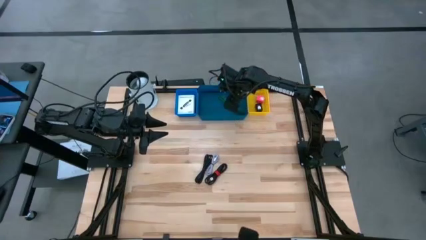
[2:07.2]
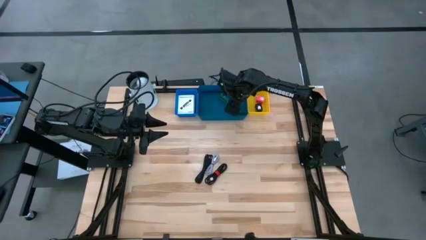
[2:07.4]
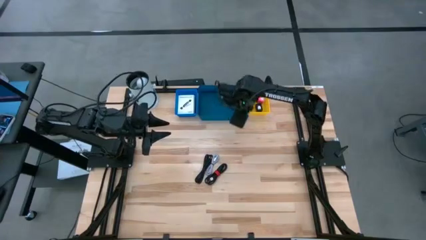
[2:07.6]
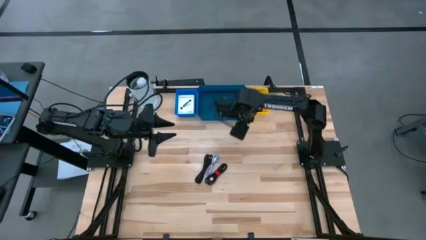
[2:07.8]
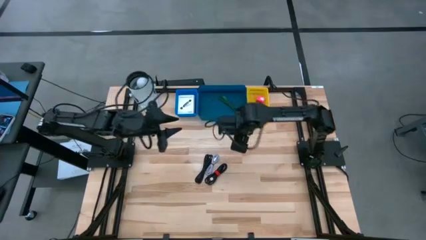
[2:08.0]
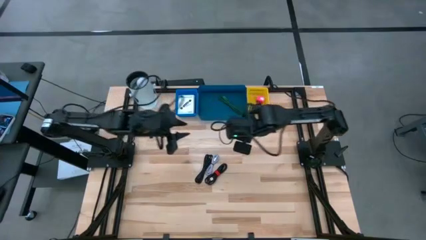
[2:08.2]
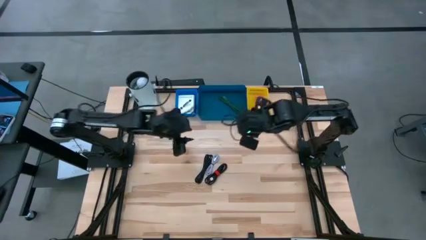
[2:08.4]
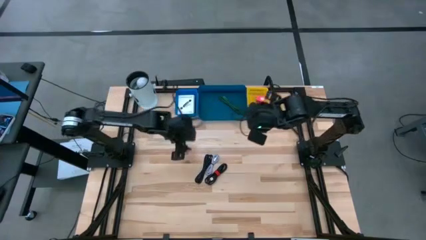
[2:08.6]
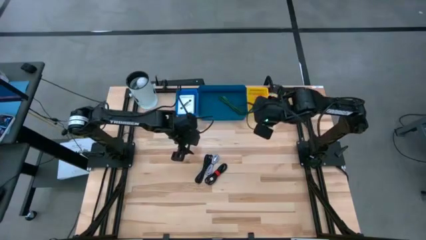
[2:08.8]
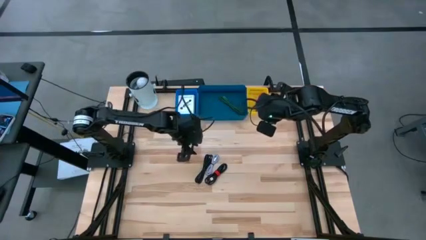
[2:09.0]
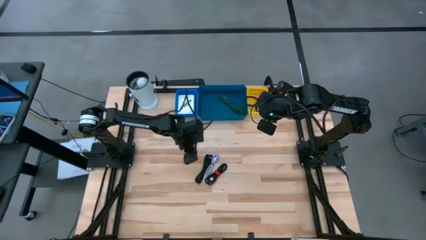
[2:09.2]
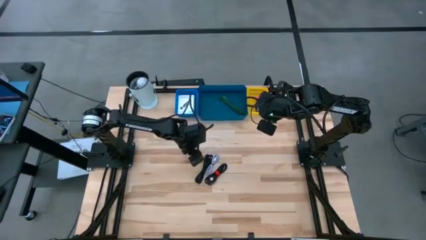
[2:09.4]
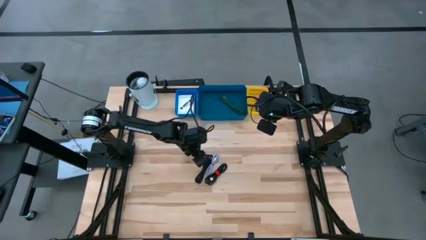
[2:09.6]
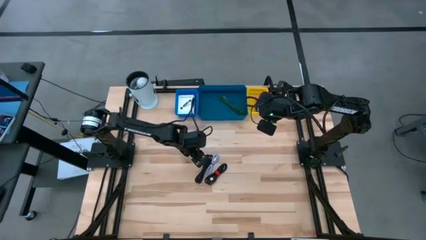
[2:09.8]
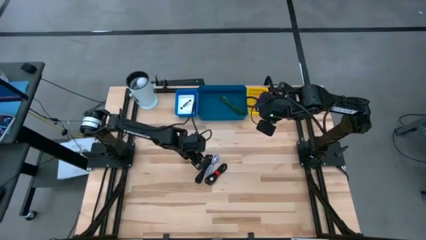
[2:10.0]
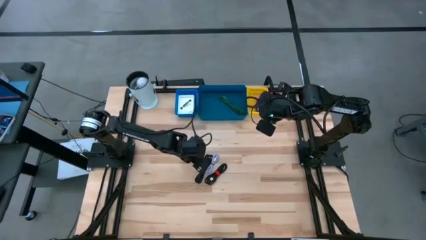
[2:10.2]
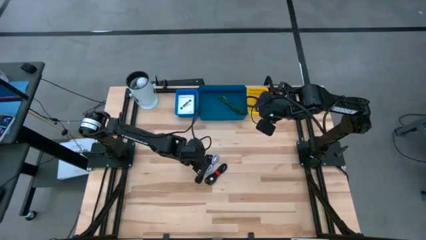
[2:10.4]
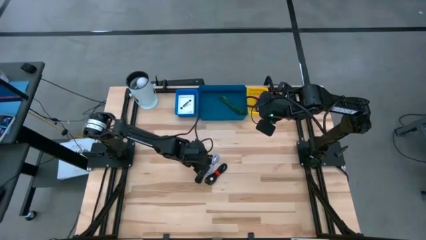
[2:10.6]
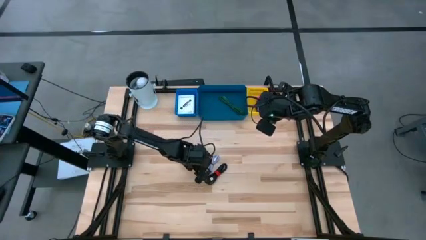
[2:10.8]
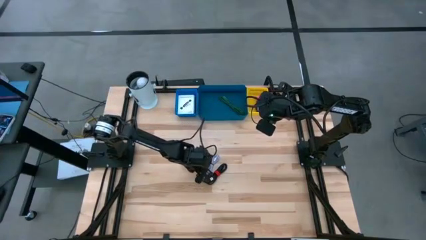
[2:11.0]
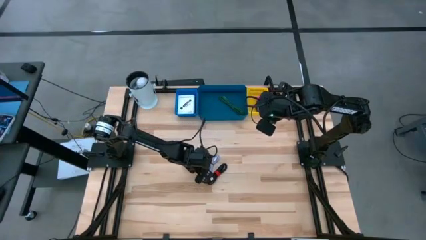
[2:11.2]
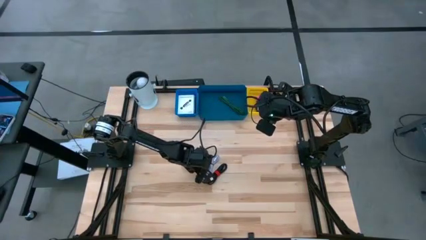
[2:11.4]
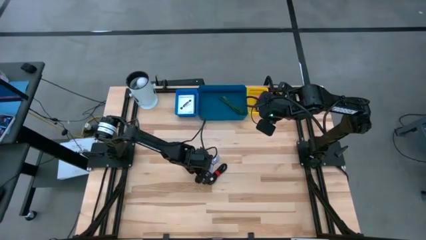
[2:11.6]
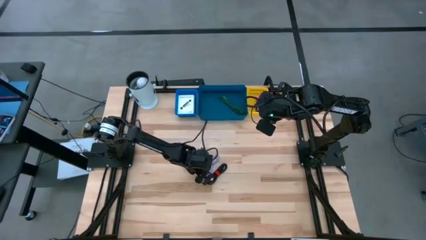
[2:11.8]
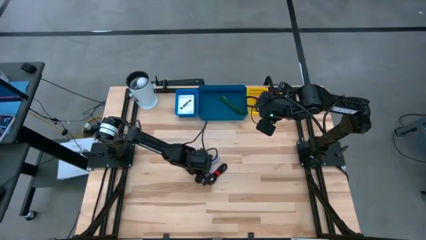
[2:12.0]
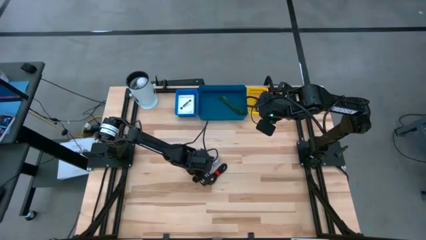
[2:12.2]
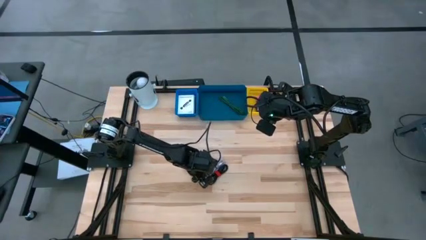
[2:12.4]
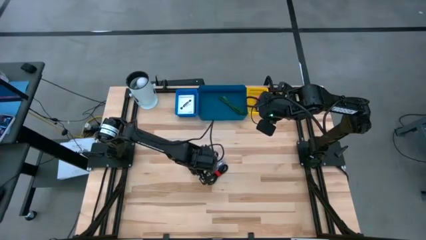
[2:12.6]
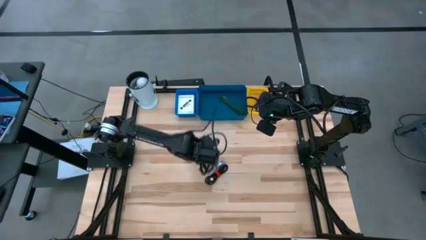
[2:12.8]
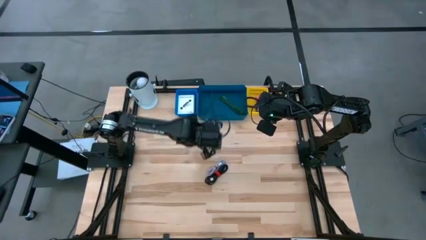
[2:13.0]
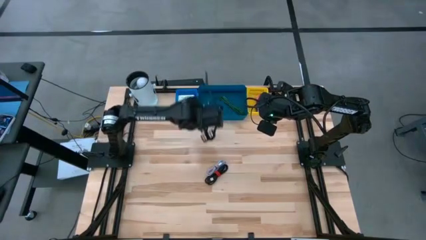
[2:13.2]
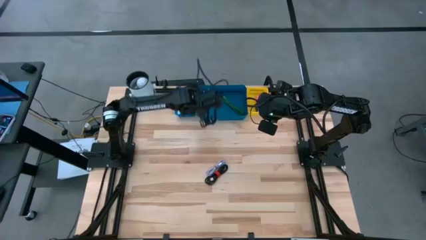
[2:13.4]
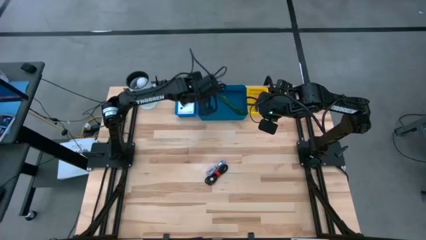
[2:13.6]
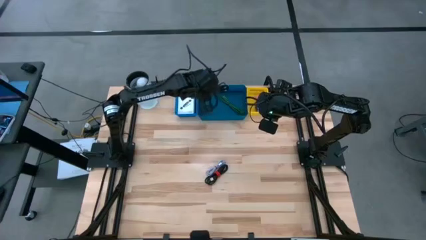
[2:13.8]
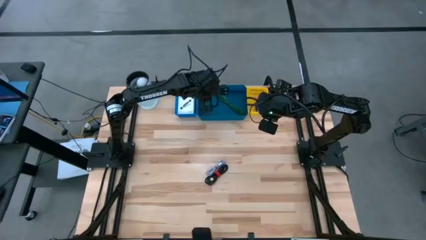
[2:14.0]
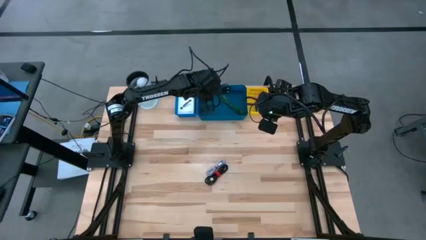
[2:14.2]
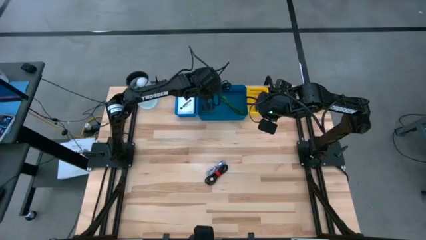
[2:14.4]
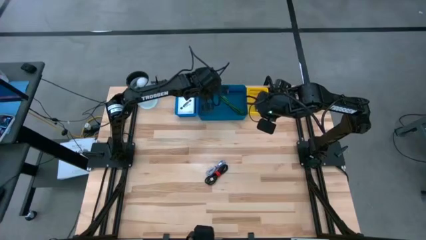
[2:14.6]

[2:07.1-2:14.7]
Task: Pick and place items into bin
Put the left black charger cable into the blue bin

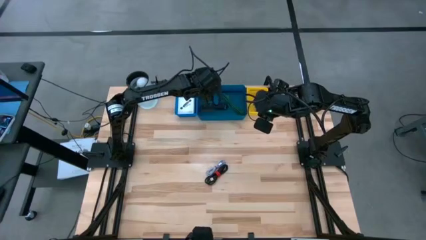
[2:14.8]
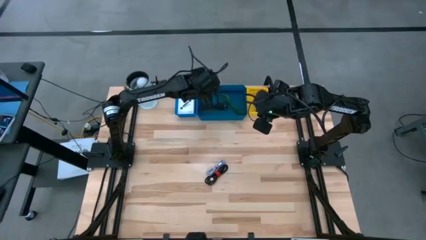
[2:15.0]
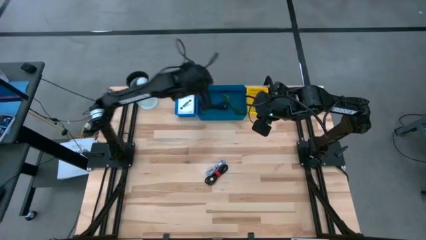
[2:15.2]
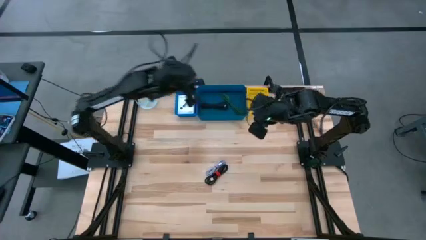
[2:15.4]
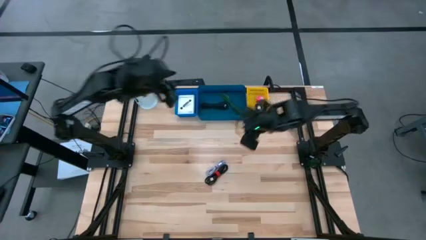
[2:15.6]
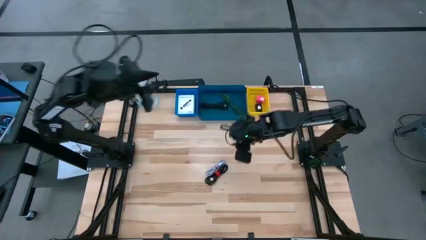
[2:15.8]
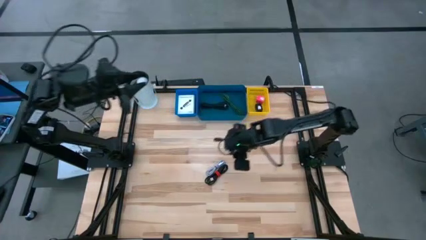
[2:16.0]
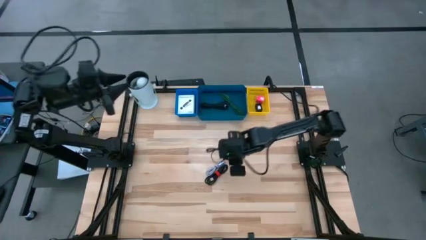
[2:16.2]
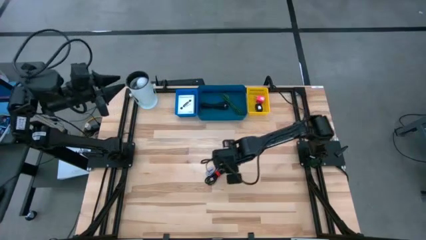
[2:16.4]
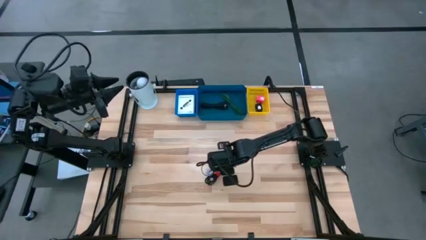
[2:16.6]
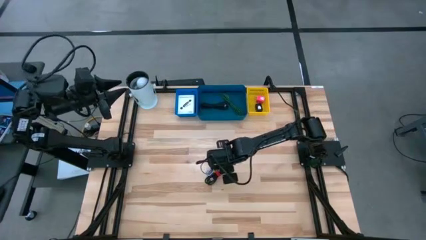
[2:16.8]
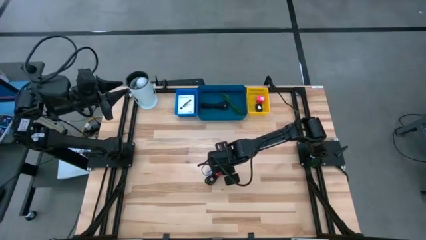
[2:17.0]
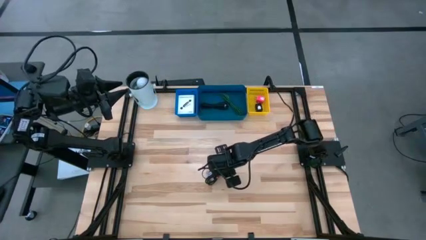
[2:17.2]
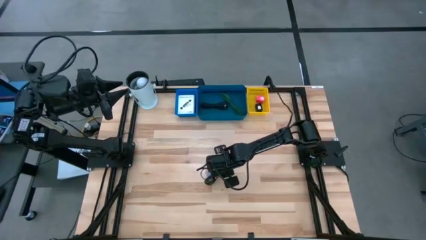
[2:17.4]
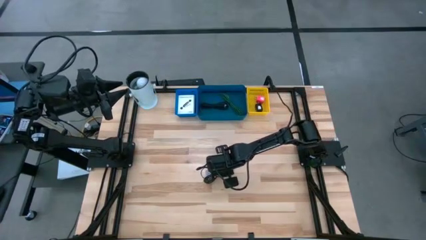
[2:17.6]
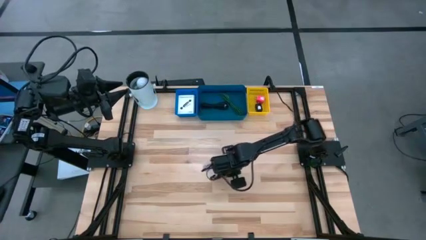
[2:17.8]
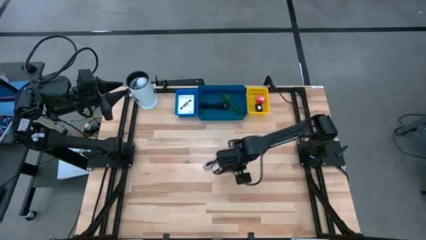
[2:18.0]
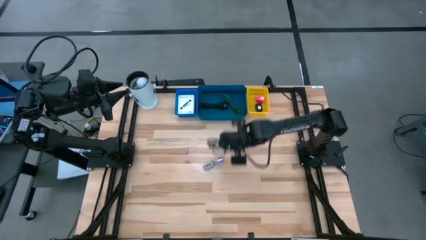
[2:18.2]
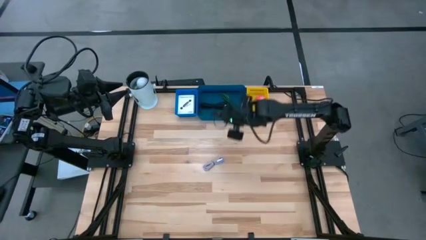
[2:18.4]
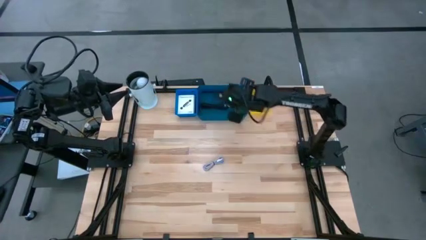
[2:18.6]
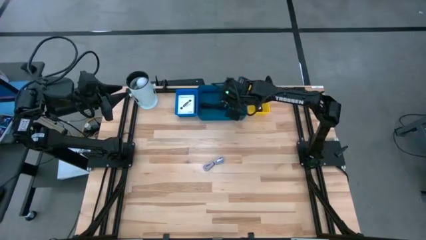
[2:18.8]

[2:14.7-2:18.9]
Put the black charger cable into the blue bin

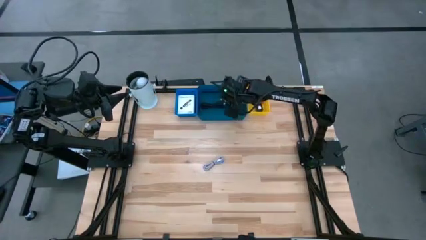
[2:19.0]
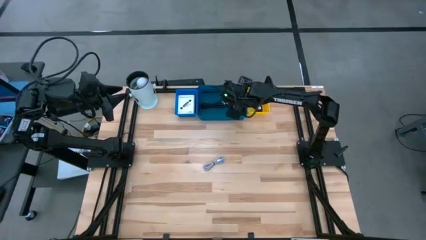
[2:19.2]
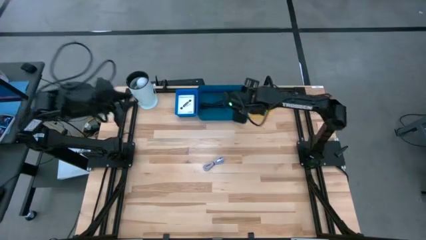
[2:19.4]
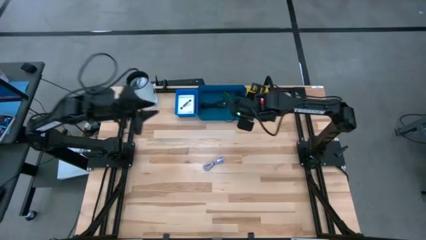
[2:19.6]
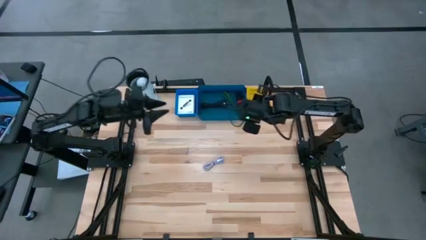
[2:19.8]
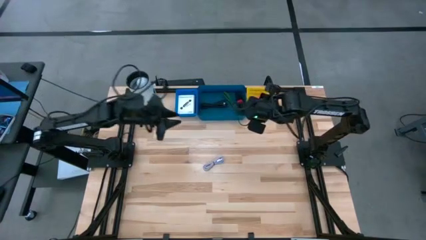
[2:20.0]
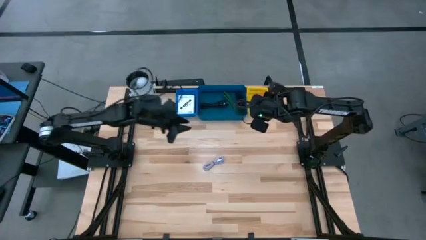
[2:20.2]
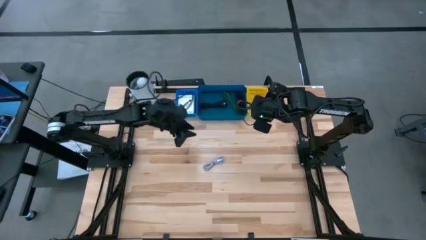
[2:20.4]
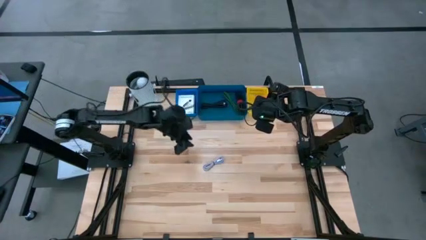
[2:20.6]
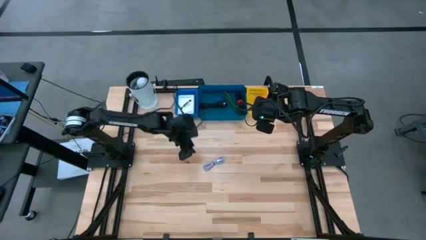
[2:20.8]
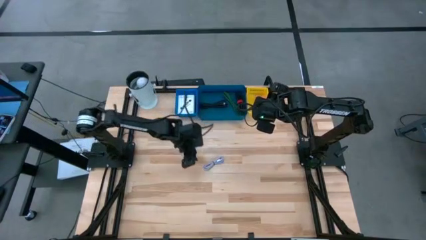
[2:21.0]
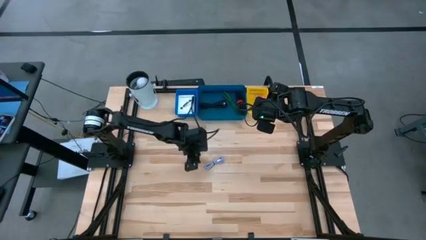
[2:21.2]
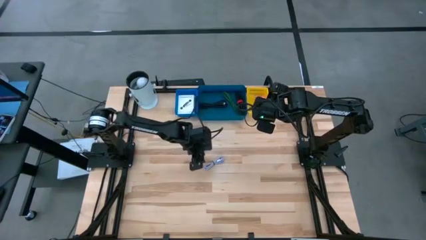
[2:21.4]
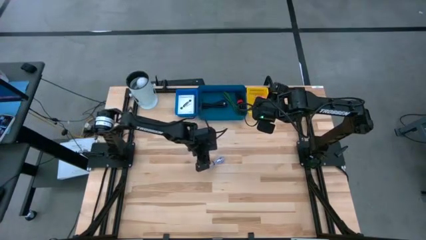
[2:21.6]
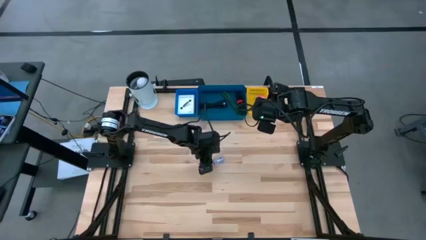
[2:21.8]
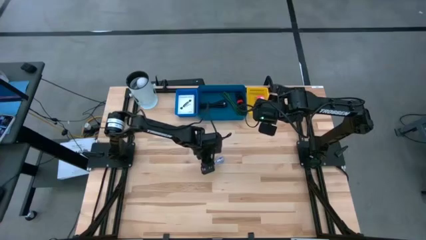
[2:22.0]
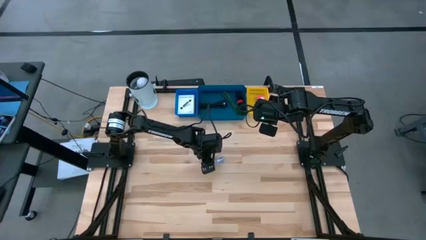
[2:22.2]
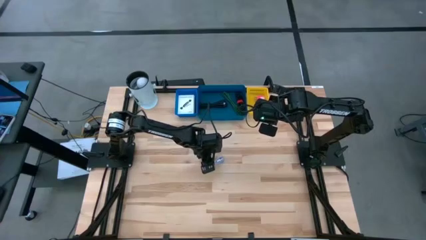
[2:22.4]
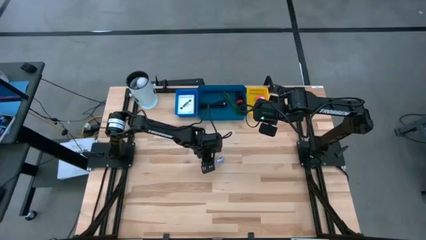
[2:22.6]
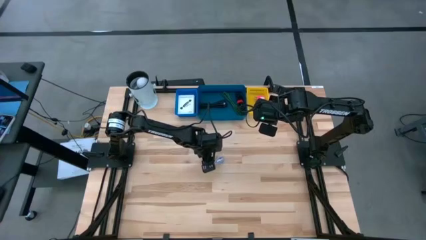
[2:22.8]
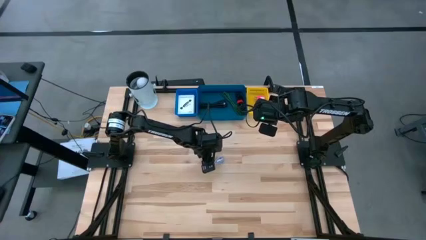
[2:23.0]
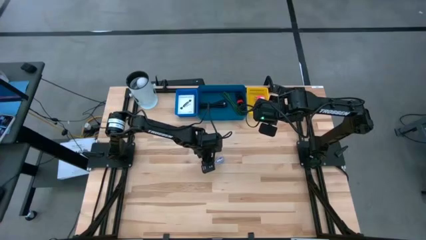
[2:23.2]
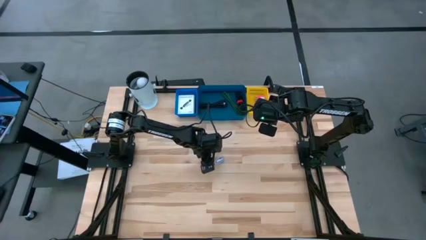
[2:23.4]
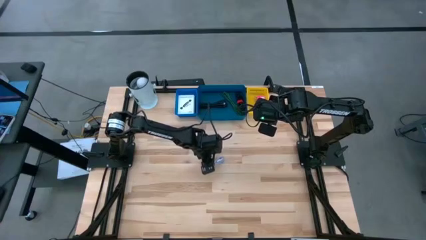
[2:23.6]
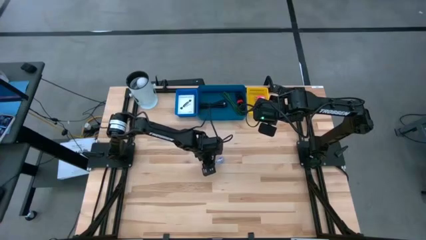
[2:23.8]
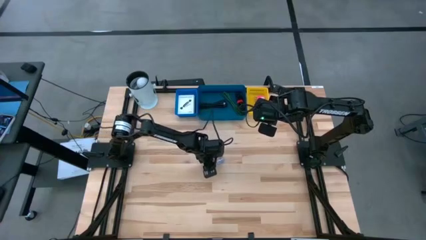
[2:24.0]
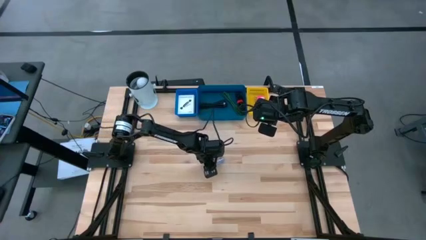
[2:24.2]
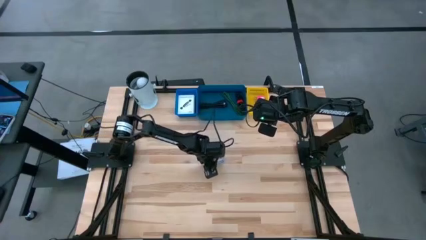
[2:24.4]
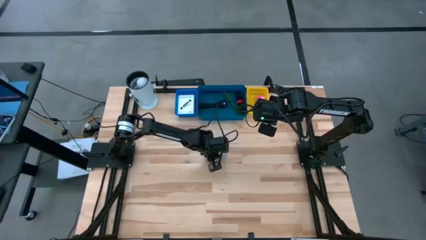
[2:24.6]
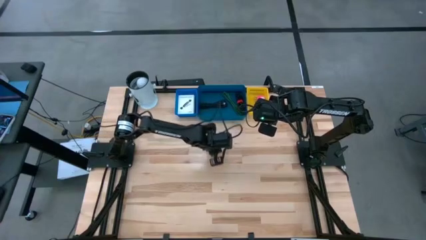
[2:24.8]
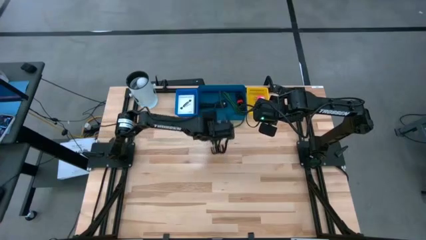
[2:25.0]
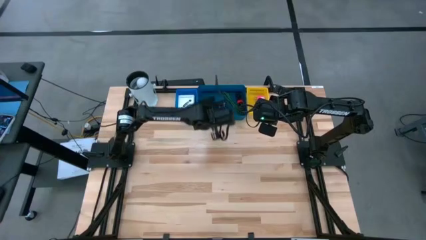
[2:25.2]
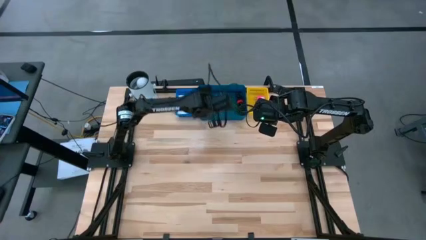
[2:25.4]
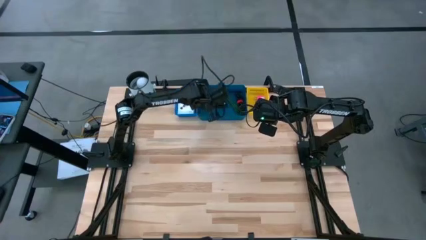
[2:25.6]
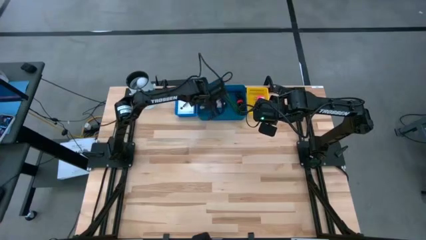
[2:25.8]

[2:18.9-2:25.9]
Put the white charger cable into the blue bin
